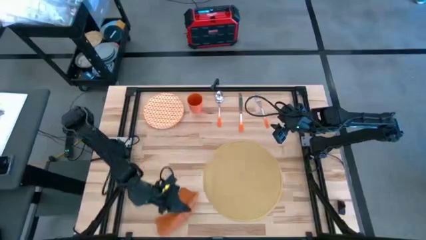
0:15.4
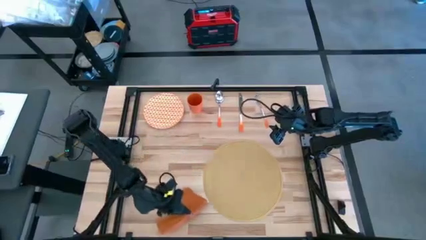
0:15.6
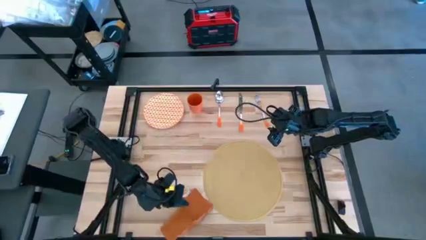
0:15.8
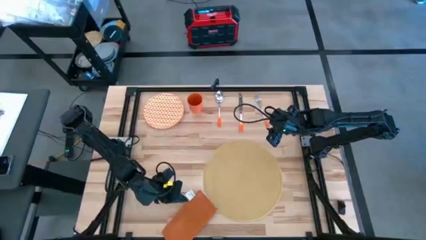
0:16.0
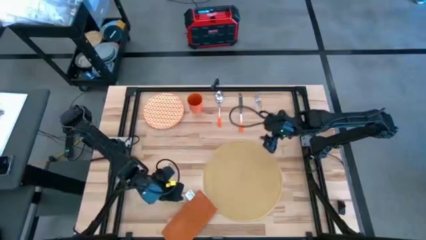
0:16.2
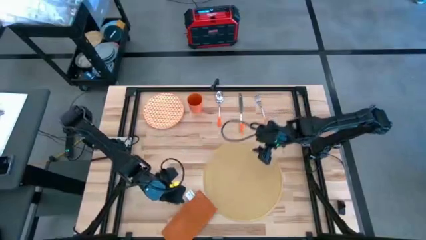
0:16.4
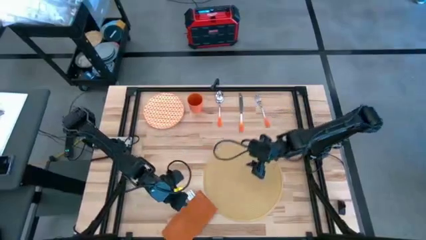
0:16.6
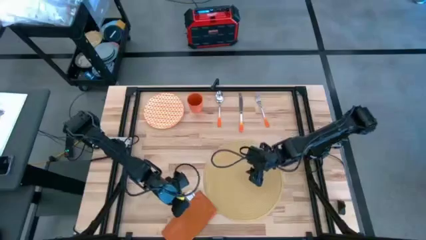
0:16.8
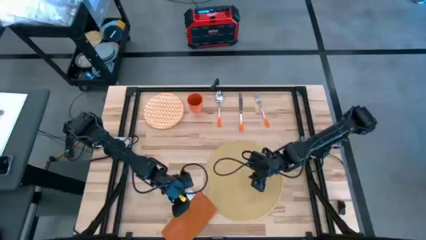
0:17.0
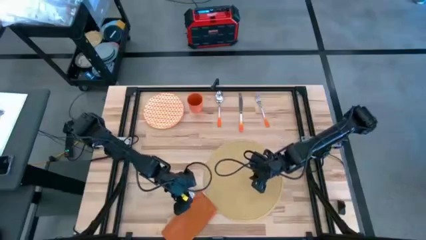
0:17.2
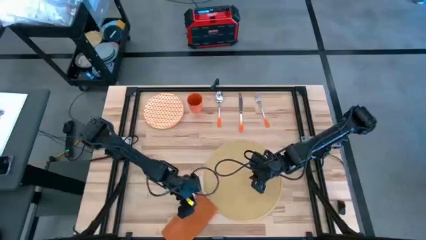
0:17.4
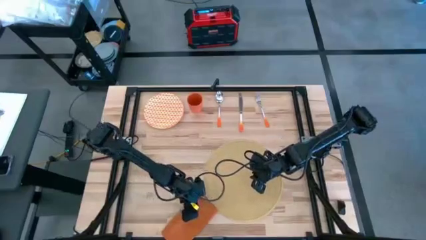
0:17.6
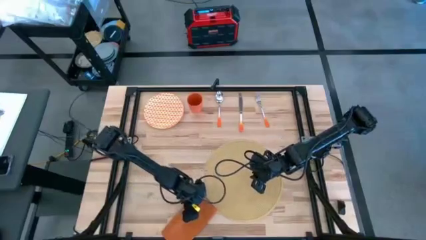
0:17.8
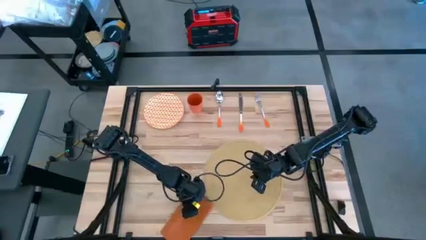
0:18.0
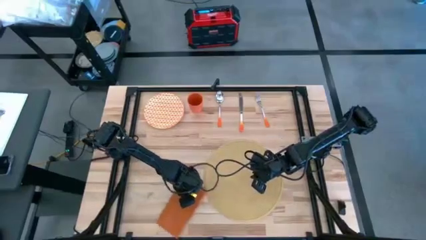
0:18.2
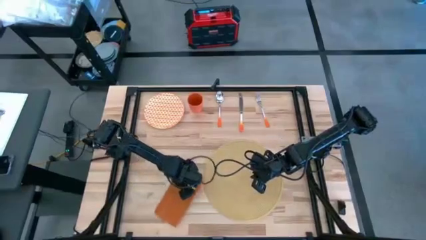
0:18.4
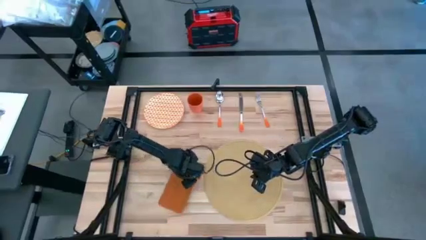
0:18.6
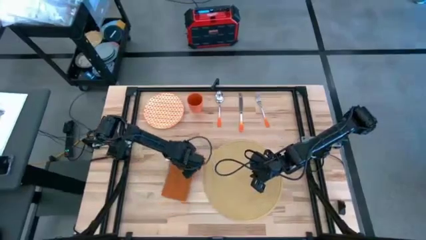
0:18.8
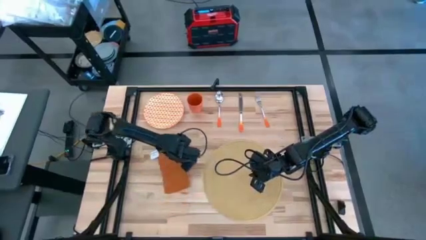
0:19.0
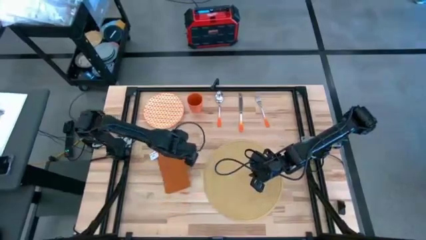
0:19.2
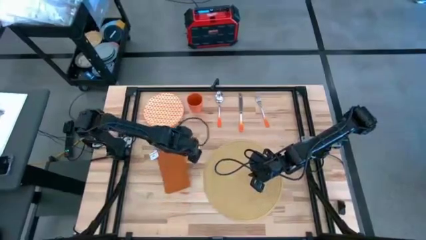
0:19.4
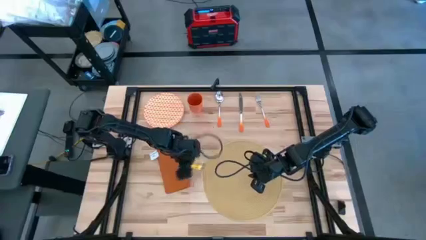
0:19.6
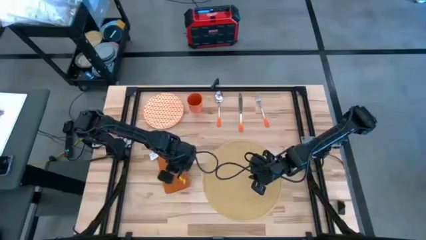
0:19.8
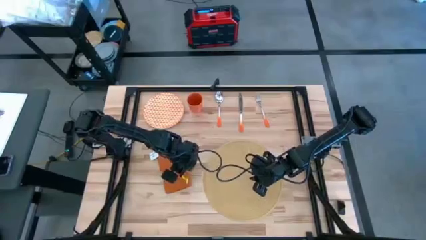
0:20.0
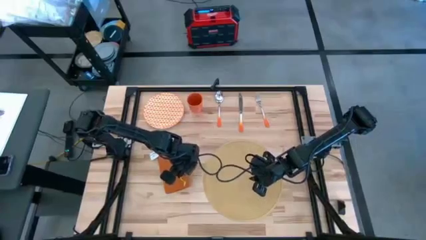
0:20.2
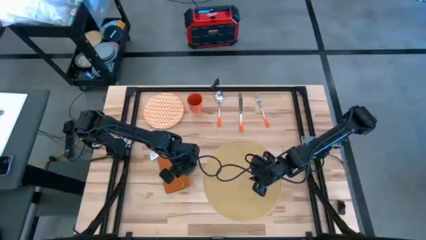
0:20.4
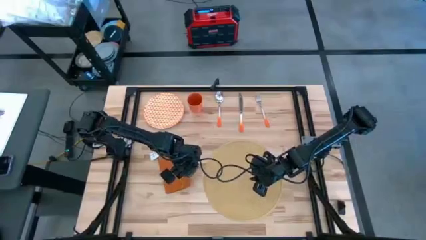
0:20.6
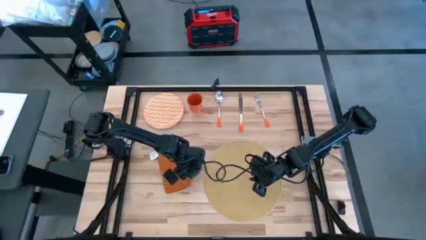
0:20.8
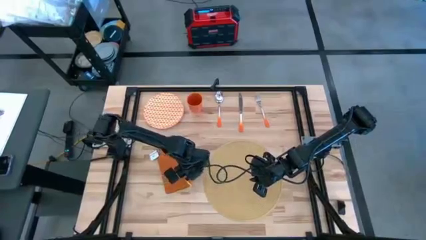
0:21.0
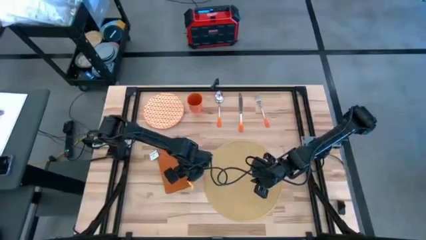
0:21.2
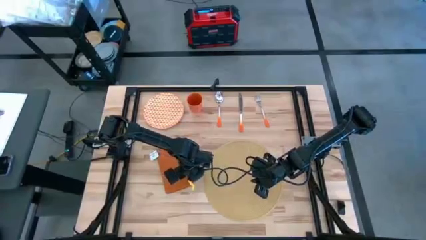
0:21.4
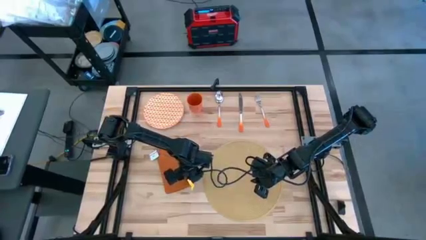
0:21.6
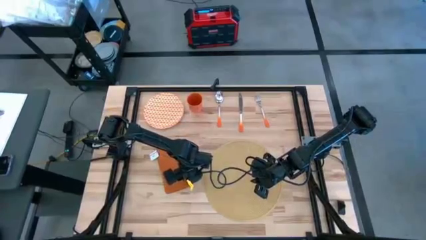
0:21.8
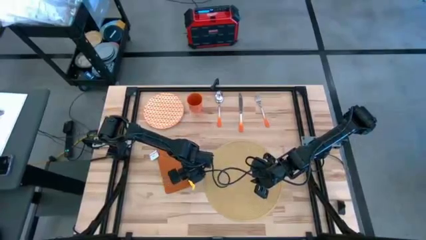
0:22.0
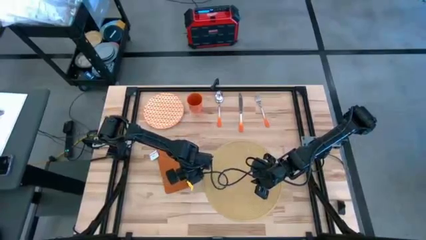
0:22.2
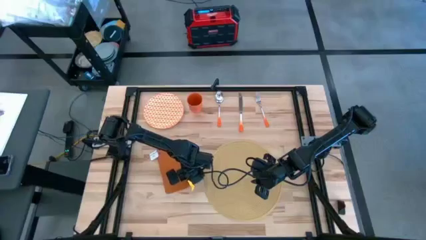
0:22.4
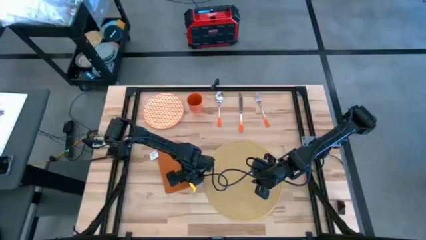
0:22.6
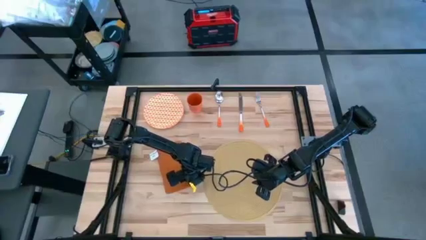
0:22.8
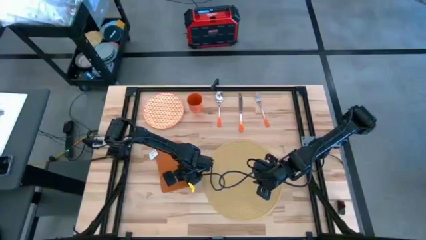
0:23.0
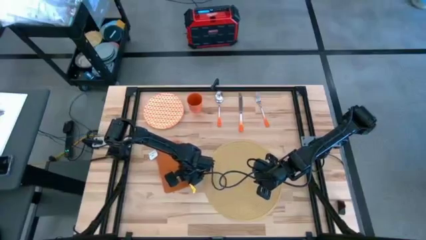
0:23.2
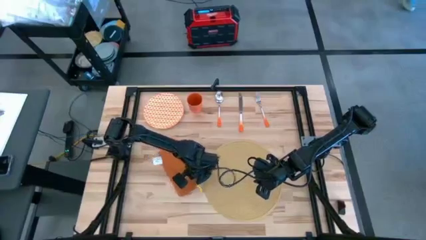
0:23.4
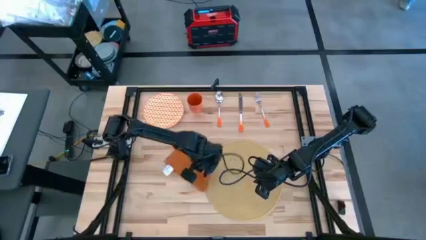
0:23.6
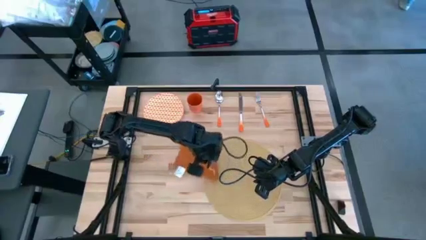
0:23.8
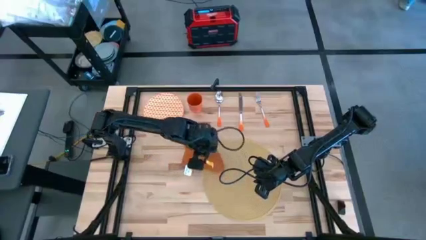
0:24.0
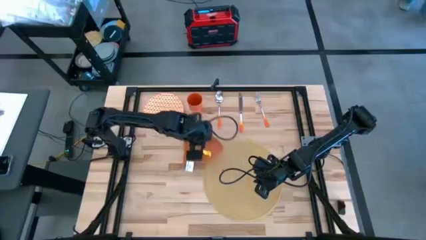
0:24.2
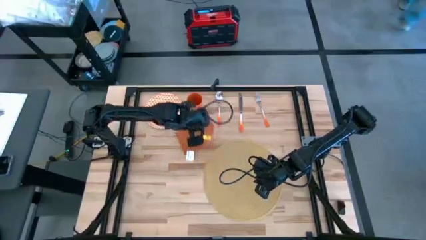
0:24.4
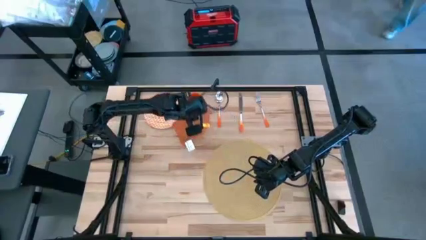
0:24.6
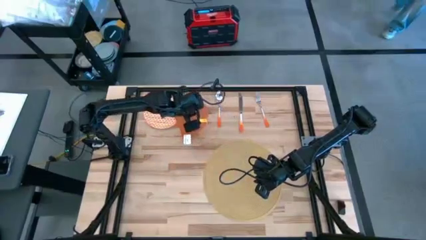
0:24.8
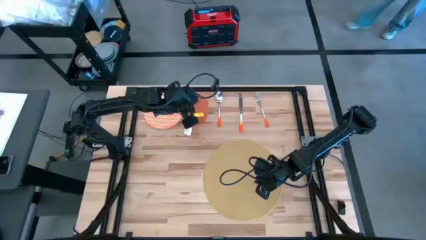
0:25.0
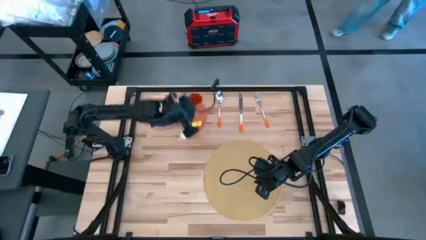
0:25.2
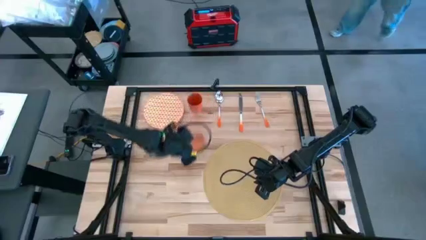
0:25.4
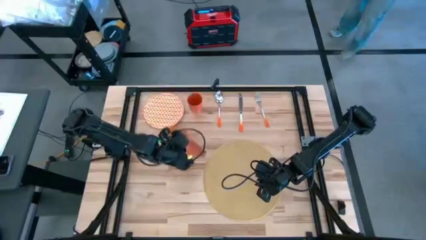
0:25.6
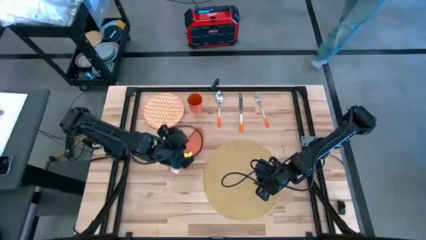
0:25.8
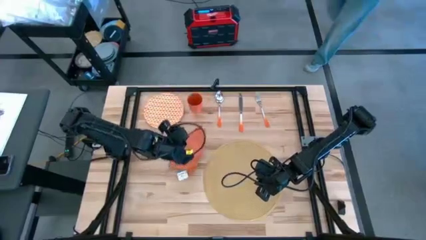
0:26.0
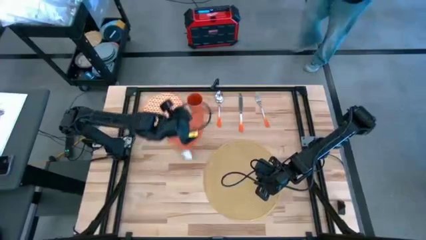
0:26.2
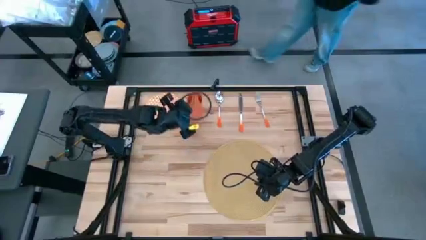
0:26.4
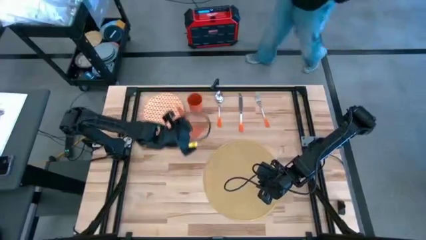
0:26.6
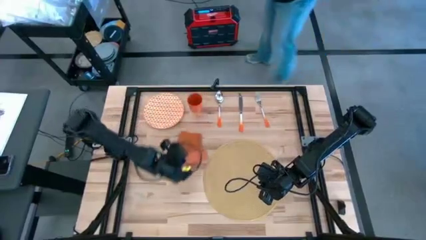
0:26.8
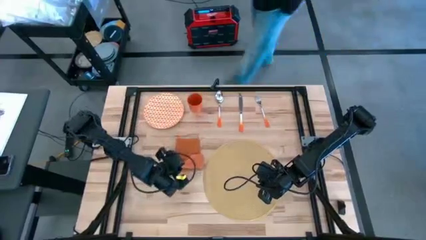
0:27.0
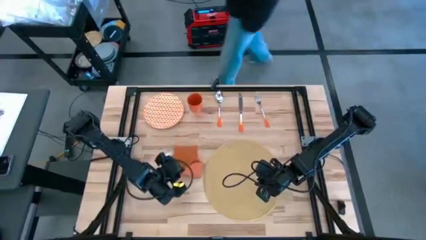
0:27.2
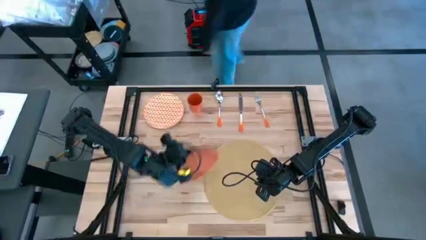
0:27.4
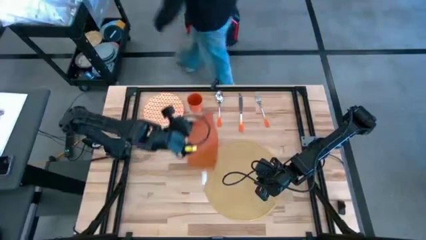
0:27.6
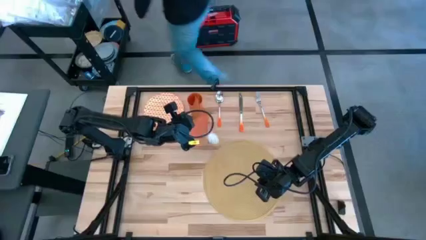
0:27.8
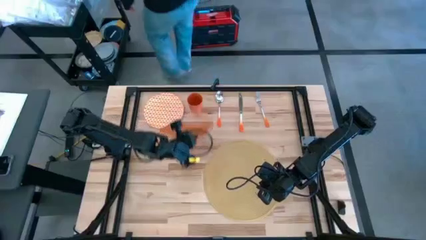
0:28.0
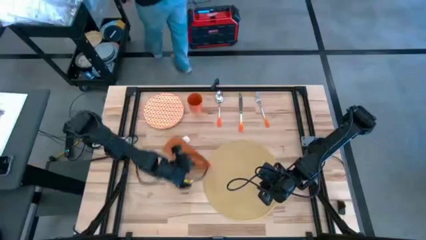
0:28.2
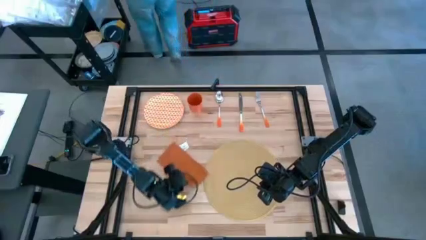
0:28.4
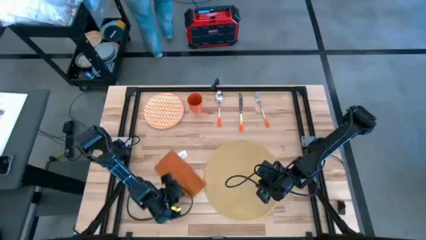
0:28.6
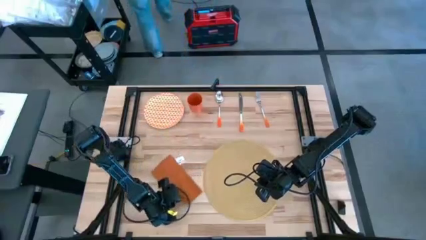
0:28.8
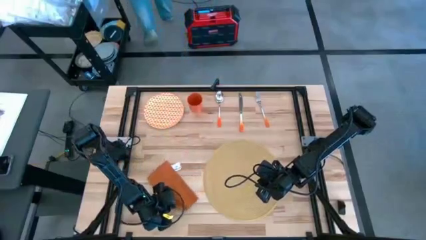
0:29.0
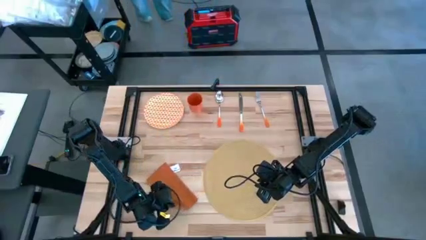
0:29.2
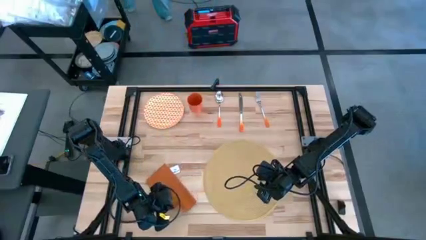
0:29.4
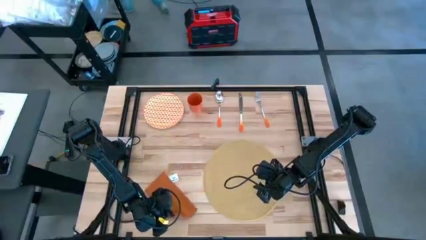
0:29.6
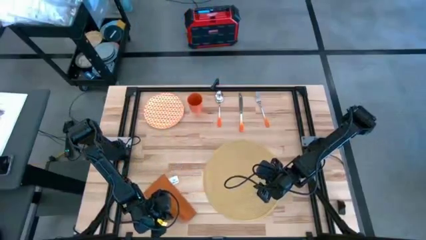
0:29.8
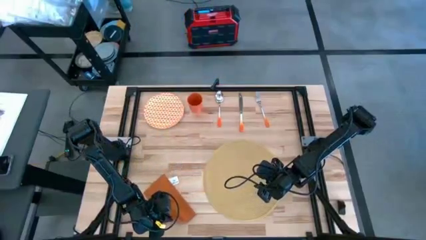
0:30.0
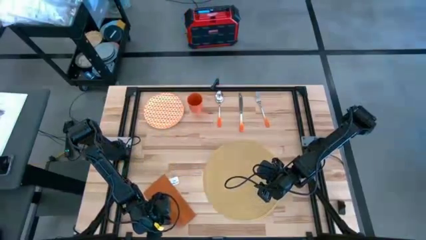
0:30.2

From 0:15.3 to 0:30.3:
Task: Set table place
Fold the orange table napkin
